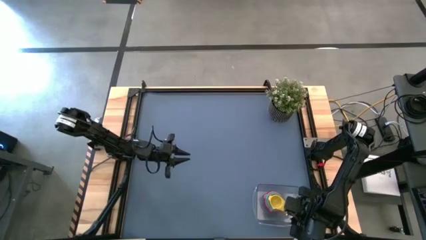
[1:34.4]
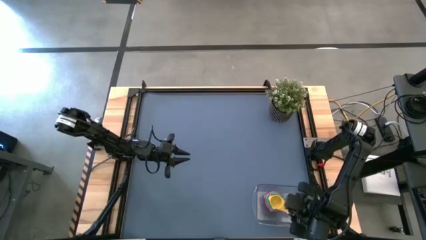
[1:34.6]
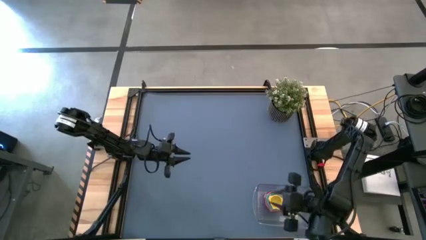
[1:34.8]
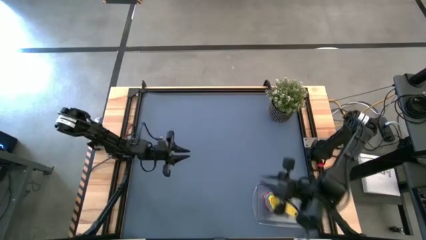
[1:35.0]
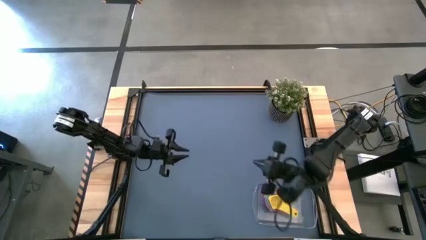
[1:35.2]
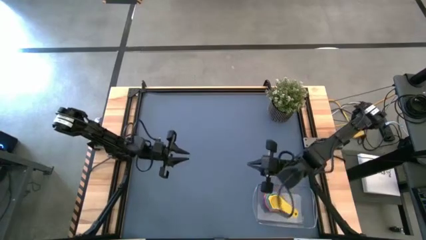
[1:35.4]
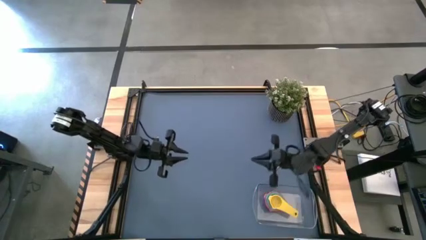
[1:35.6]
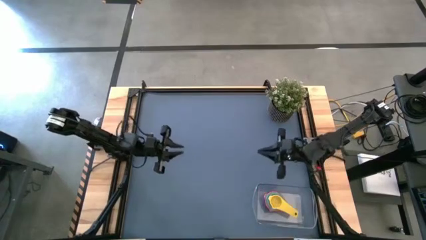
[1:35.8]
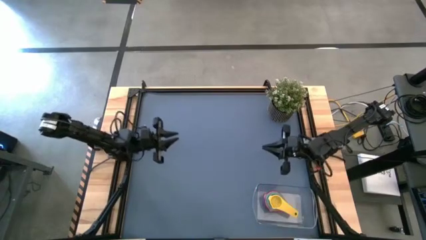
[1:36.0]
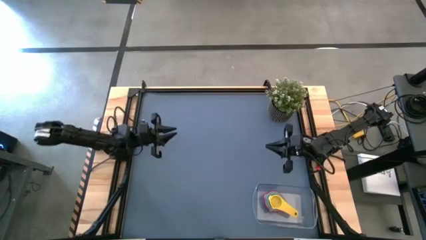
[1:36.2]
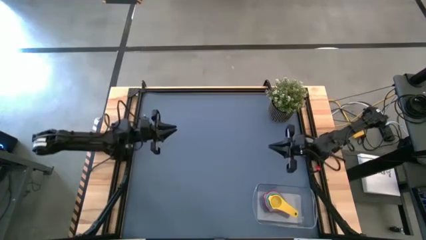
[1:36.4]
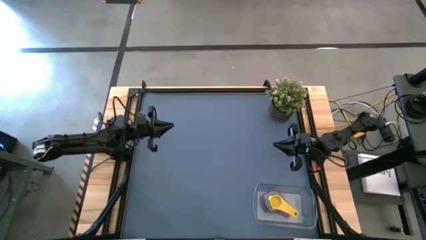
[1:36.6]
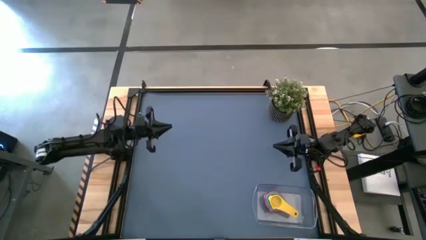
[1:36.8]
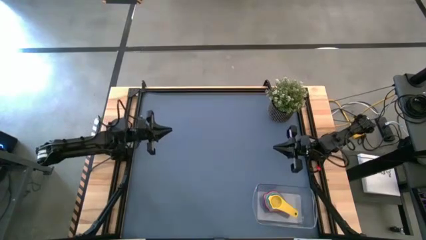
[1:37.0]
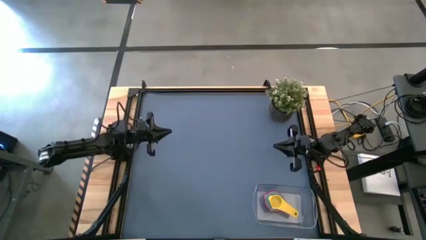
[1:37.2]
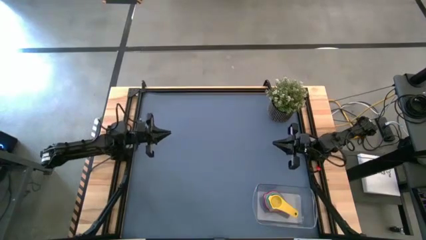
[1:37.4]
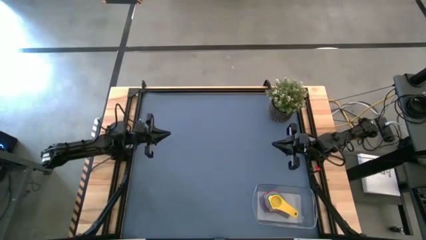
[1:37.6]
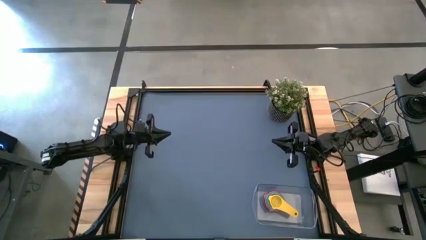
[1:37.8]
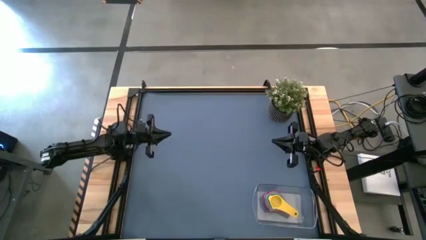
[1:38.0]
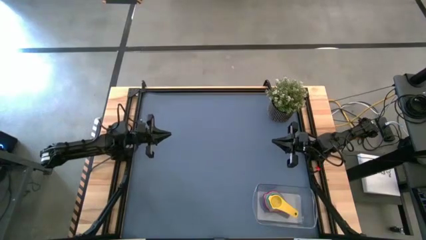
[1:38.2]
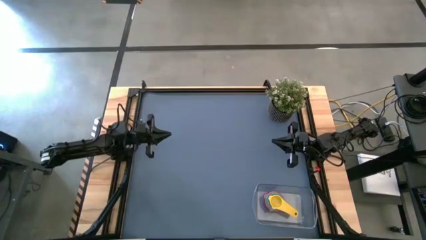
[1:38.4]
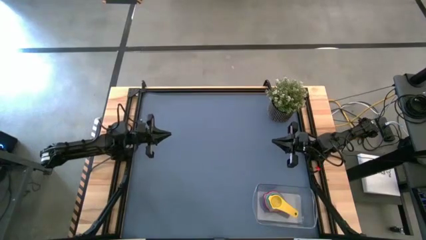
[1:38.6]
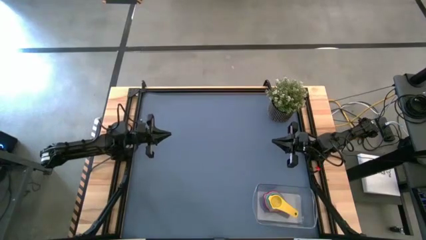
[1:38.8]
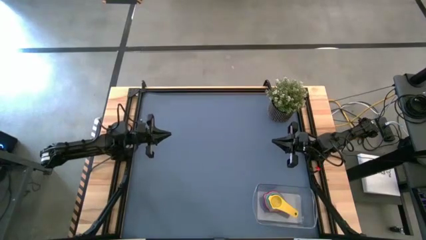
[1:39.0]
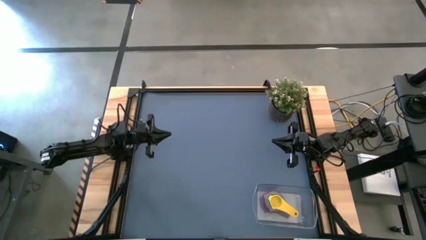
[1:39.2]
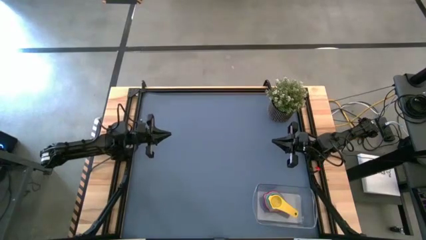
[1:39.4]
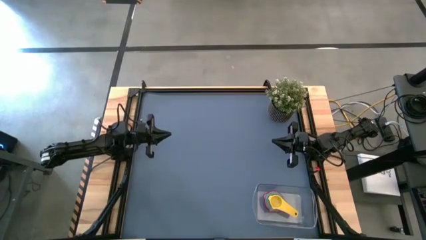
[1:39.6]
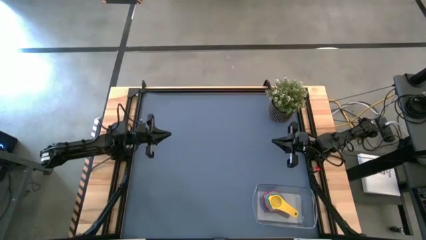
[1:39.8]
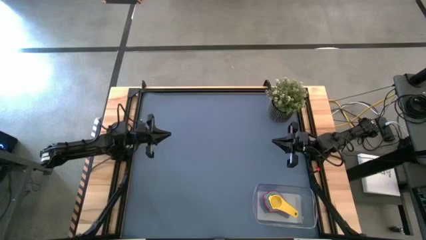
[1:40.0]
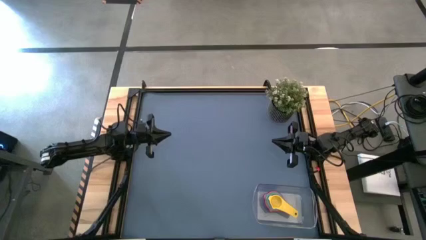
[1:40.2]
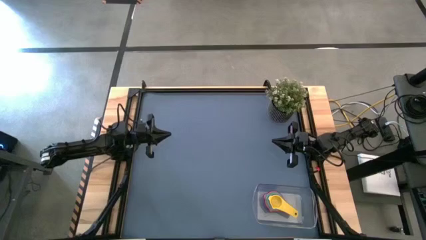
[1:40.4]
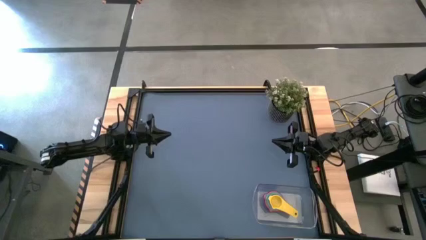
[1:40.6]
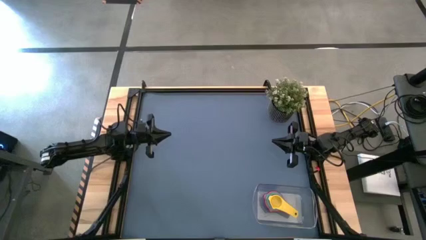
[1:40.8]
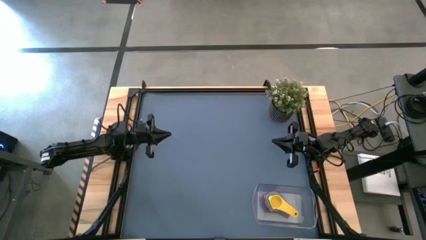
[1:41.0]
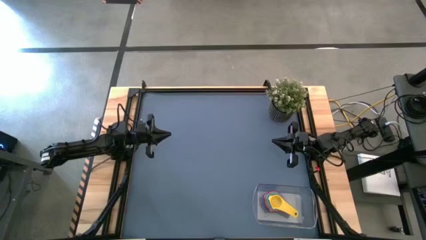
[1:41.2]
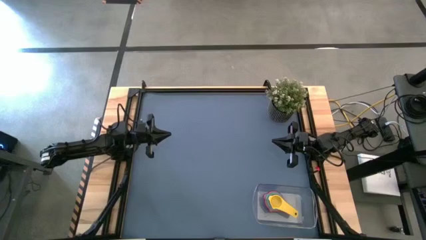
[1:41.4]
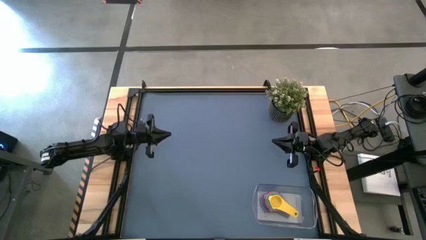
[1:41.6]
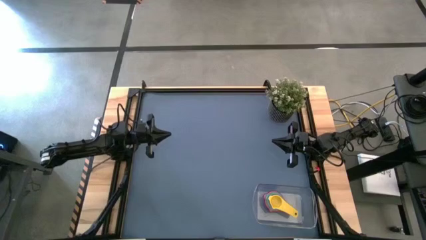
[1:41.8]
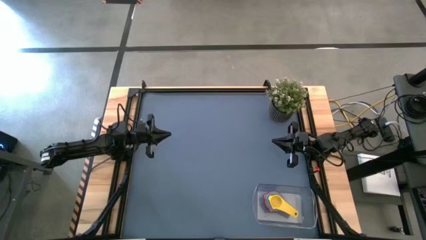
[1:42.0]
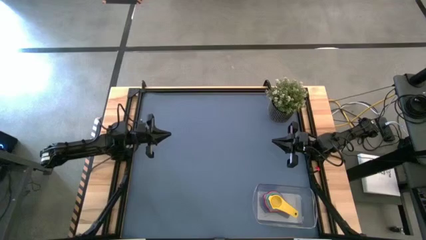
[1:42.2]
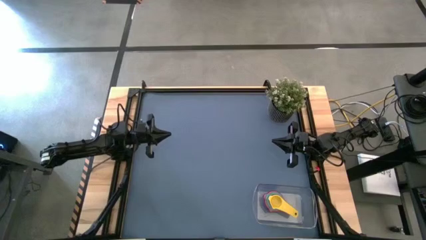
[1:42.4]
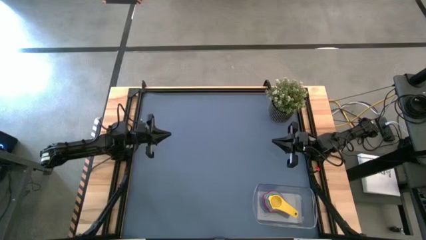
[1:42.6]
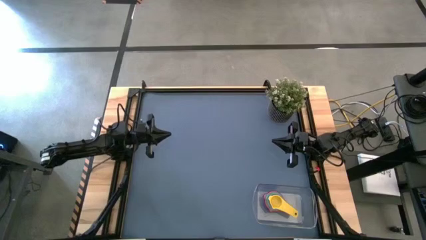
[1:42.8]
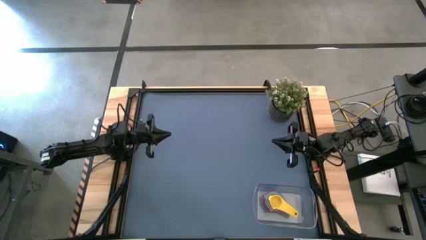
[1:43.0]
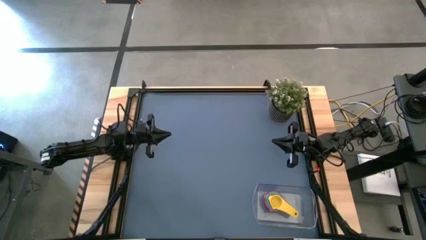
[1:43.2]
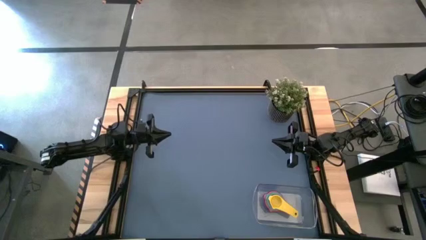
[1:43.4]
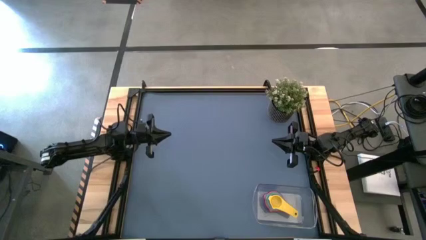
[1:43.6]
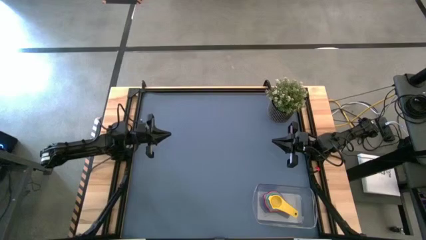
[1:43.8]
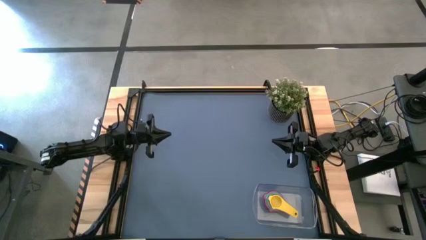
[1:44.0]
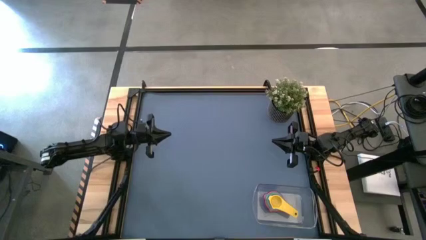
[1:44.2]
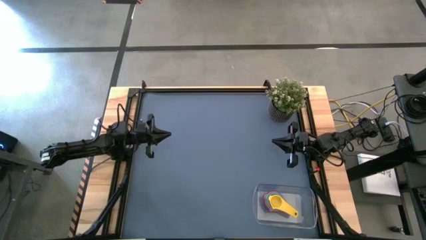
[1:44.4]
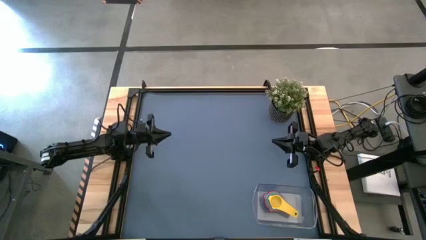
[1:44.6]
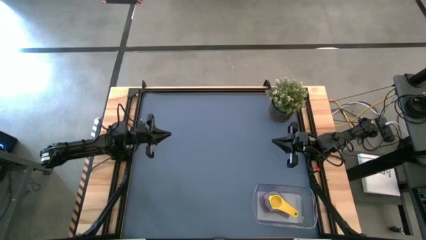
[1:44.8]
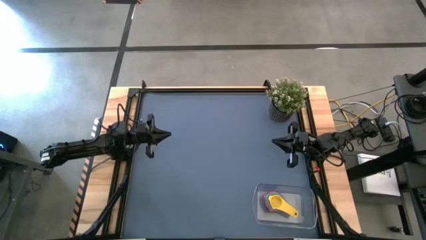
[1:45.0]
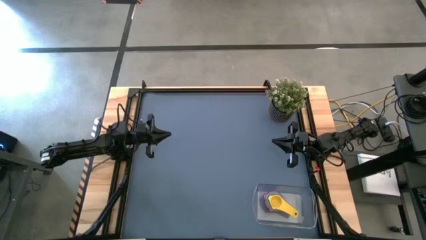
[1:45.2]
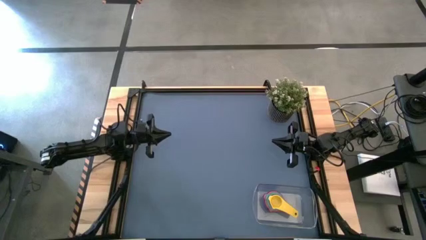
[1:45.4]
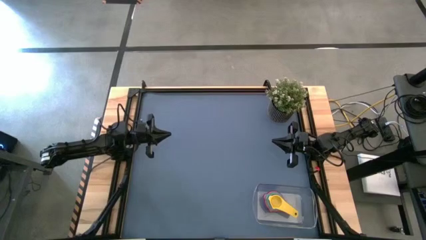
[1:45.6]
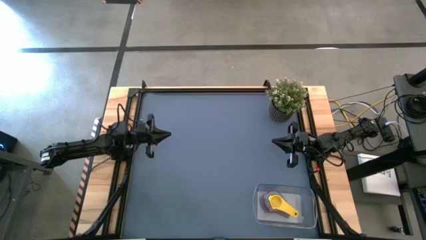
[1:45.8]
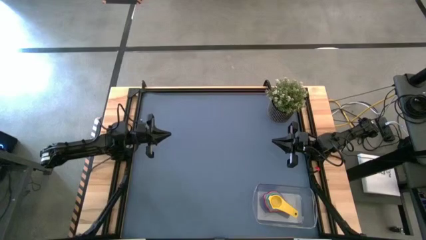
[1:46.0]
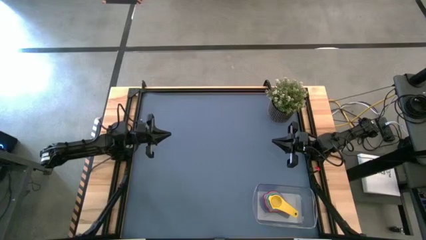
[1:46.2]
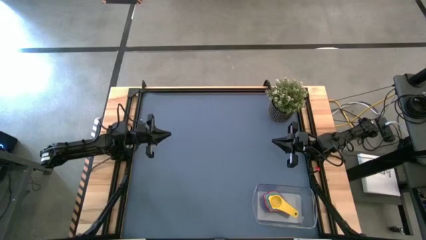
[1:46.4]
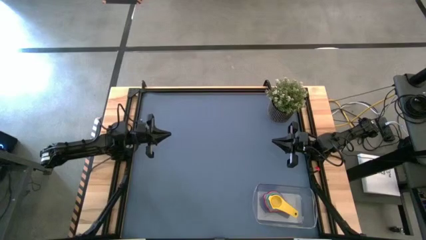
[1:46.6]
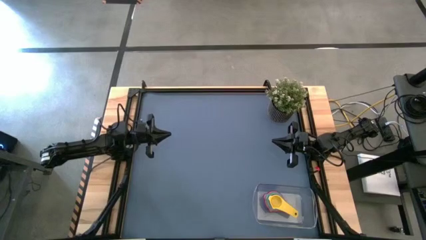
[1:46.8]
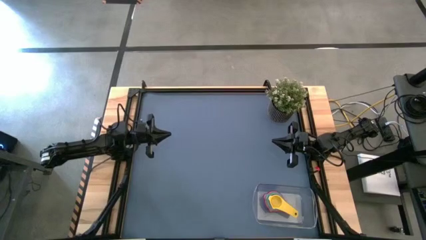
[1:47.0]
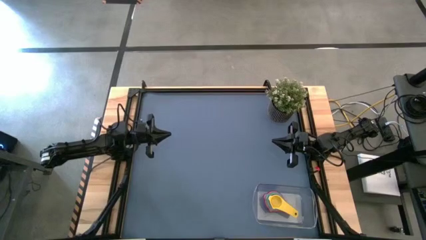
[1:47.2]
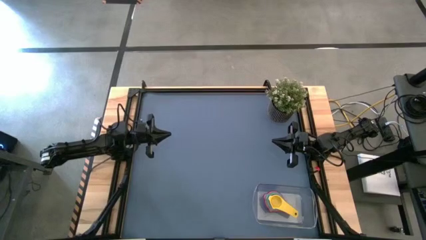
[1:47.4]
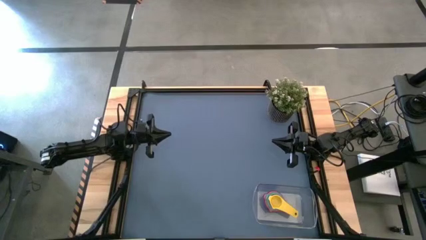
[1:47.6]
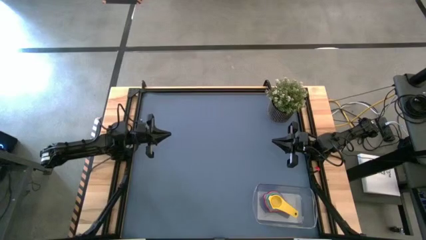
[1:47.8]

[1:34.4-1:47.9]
Task: Nest measuring cups in basket
Return to Home Position
